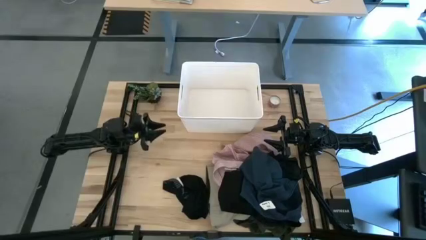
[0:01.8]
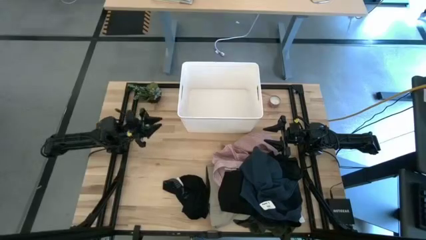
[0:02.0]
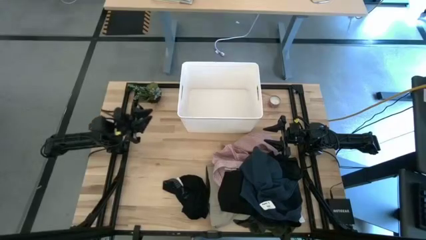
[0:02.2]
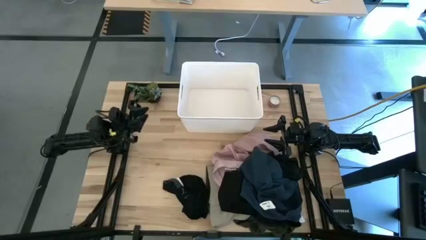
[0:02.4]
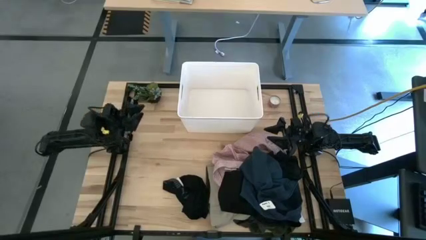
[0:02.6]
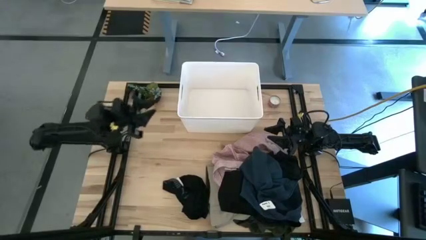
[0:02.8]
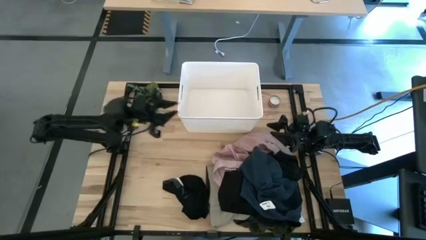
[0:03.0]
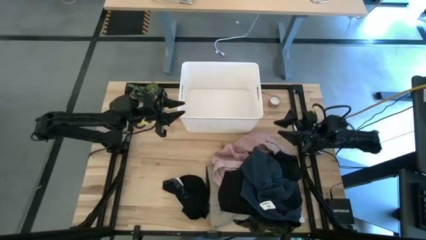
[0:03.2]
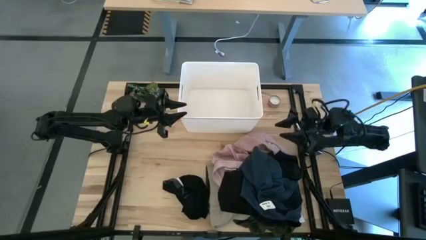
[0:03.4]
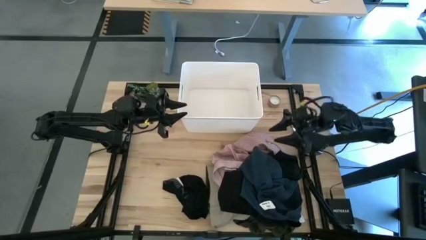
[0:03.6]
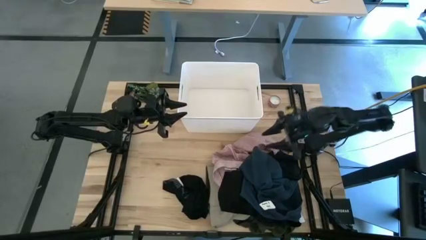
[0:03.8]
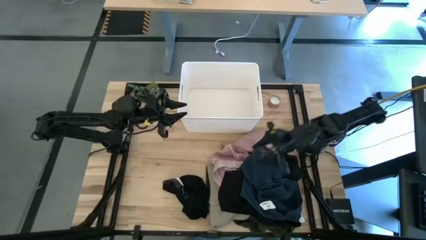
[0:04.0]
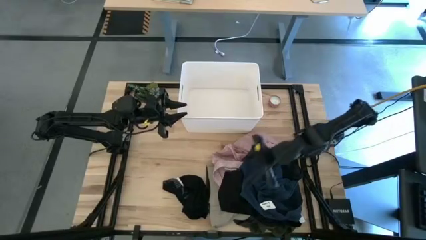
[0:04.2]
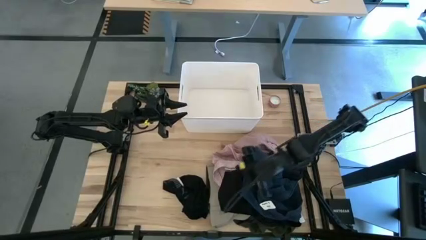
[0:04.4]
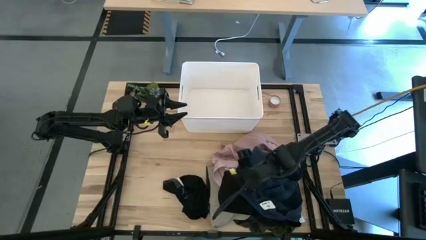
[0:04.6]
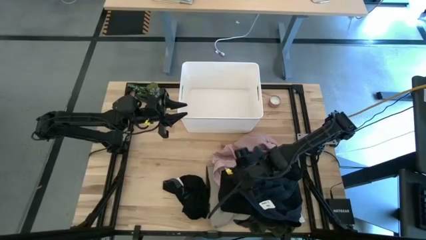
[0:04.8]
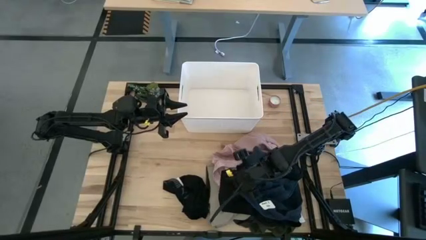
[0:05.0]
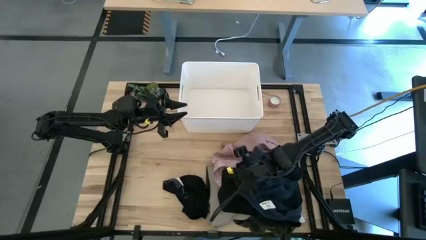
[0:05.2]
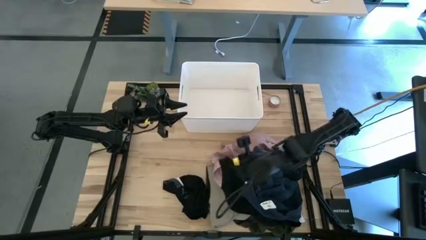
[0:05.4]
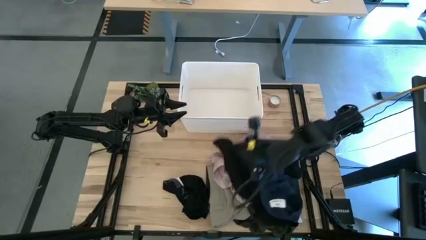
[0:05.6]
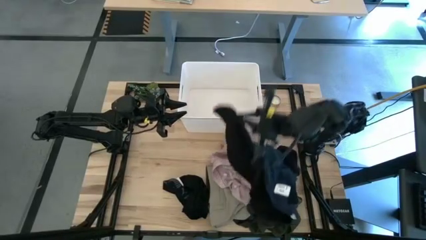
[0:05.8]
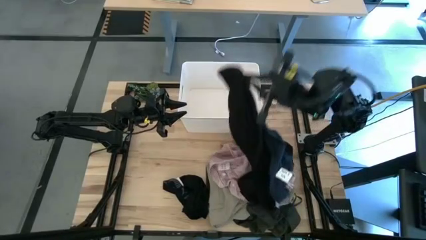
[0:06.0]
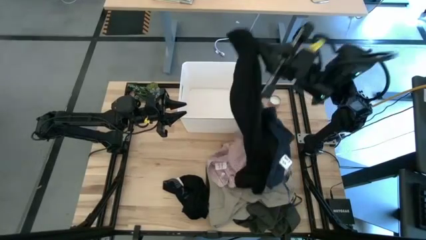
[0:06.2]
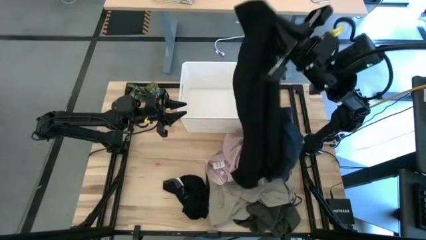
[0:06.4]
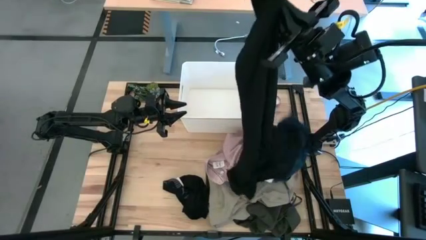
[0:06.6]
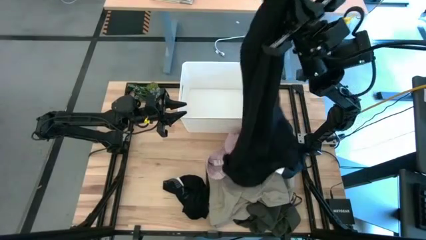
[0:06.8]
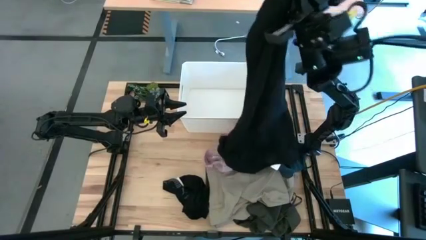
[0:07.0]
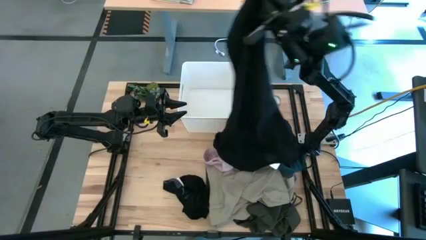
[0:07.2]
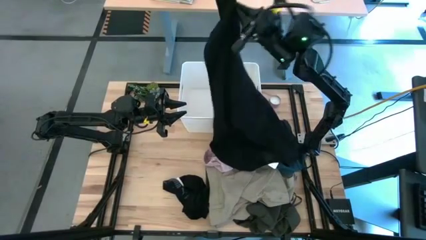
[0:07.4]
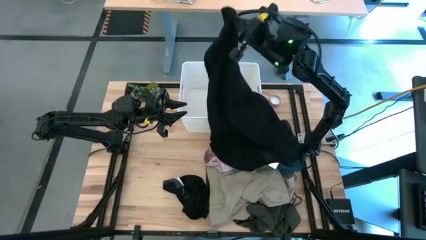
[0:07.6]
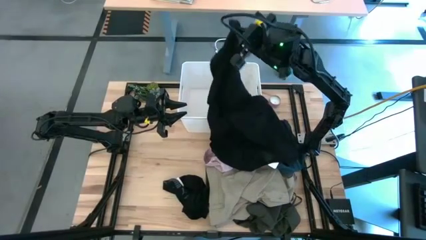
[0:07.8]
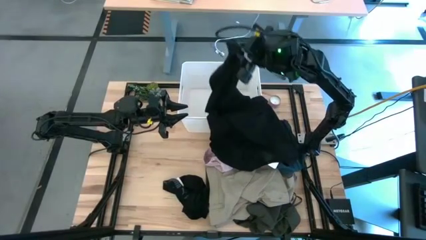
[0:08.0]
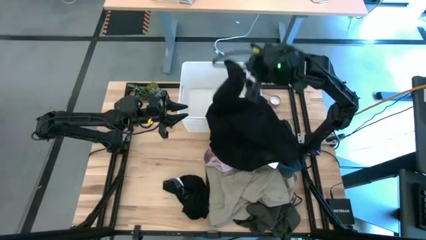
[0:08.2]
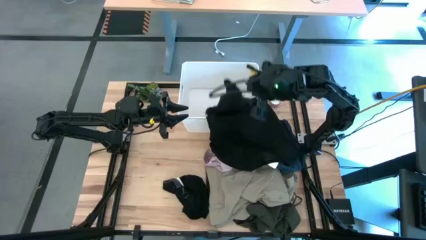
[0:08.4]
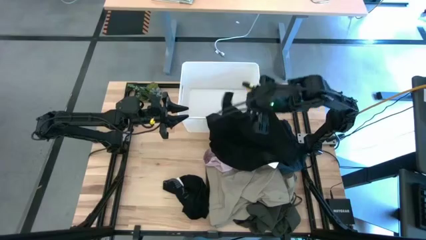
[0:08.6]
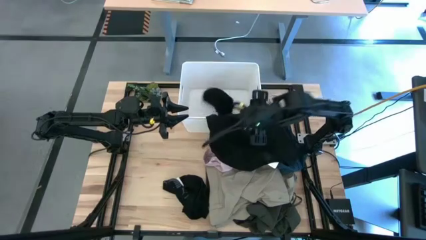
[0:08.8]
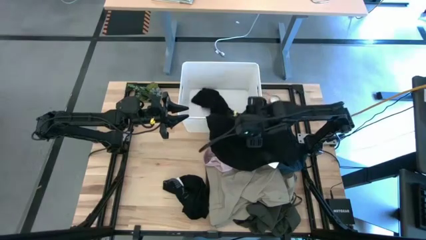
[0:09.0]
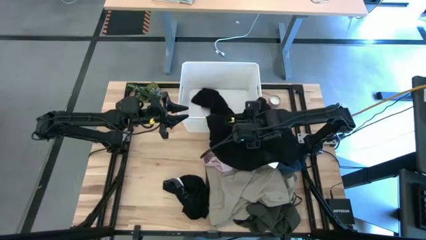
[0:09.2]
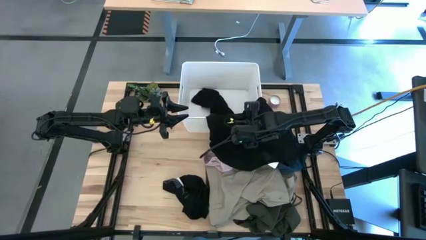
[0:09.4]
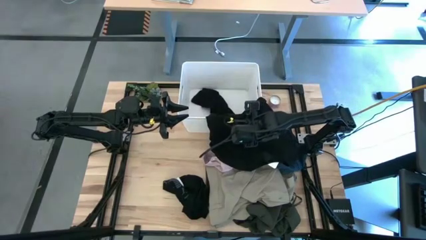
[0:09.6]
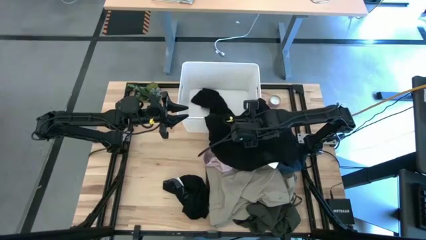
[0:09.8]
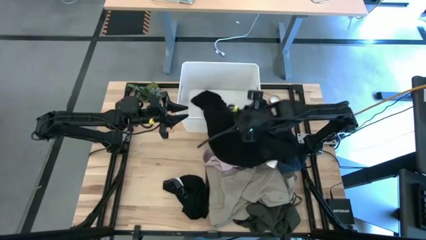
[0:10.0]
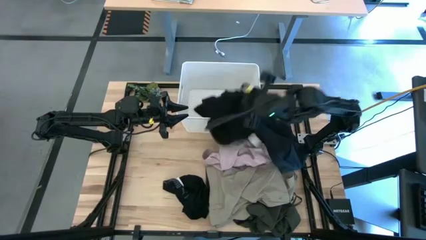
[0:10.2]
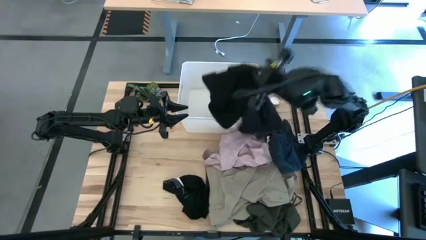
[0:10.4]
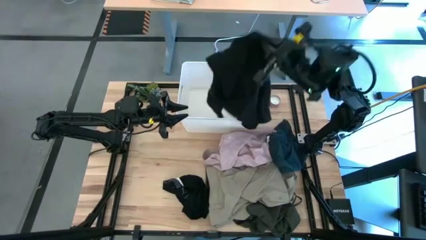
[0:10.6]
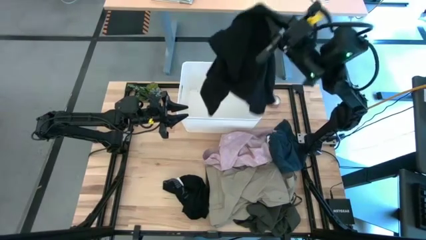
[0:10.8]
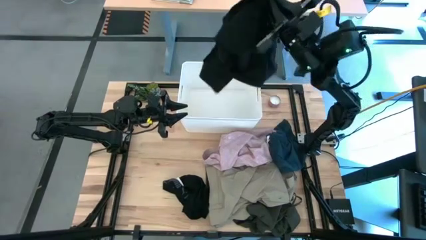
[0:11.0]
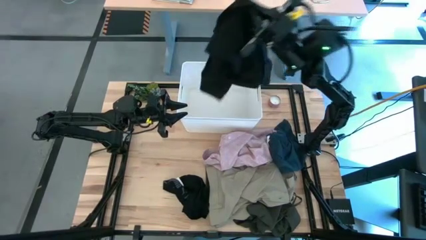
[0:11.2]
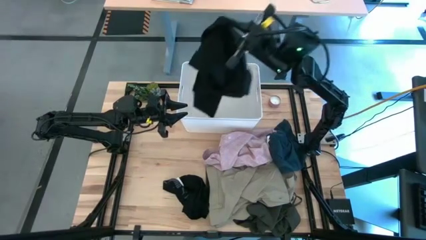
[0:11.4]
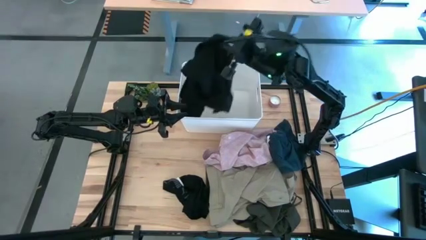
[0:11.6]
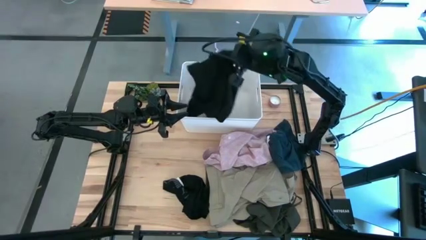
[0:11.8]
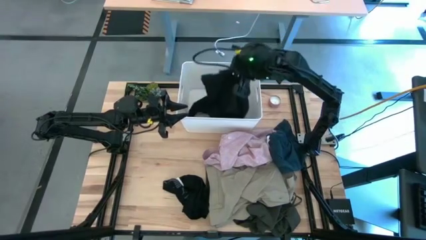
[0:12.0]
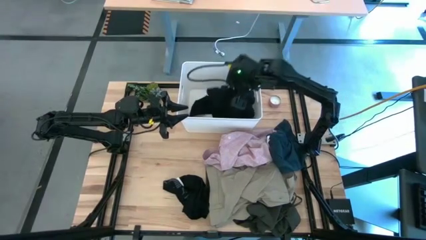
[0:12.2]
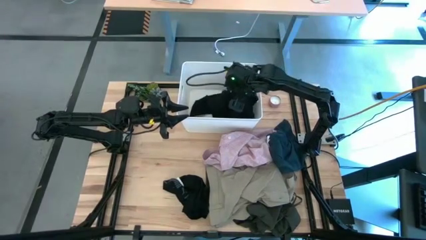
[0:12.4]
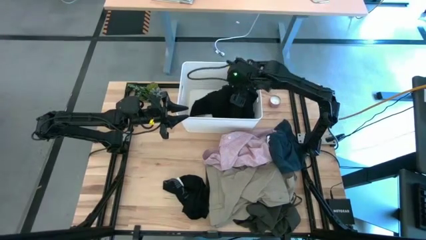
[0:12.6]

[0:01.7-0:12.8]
Task: Sort clothes
Put the black pants in the white bin

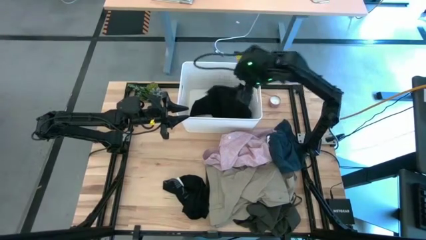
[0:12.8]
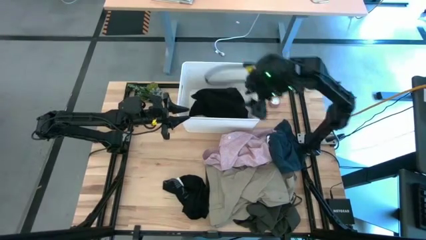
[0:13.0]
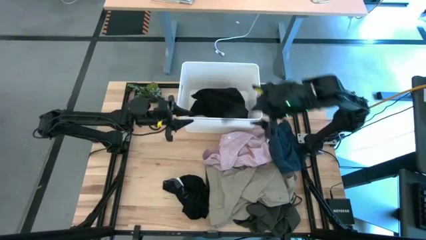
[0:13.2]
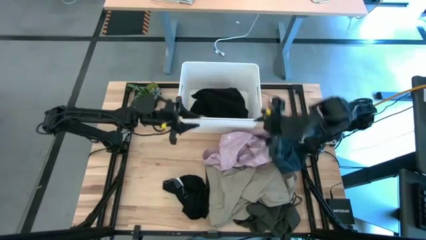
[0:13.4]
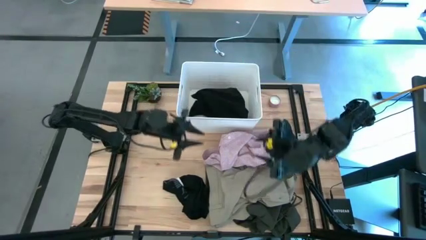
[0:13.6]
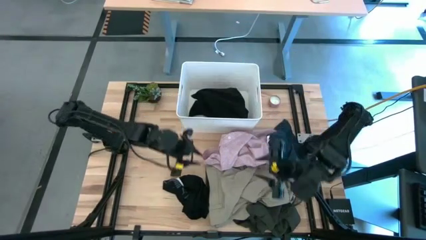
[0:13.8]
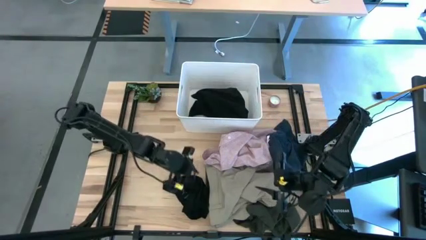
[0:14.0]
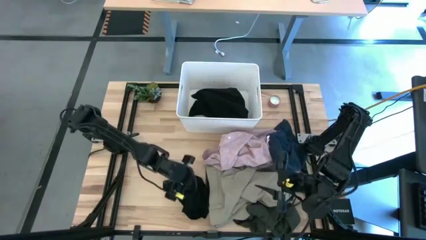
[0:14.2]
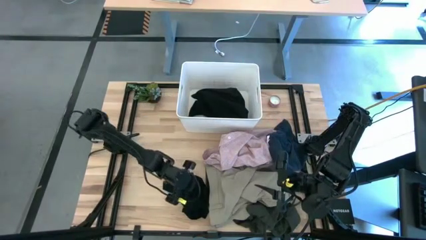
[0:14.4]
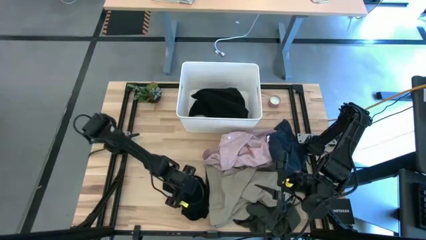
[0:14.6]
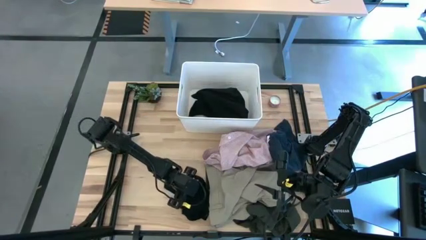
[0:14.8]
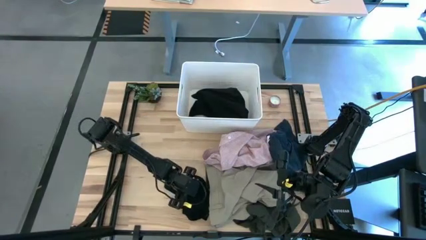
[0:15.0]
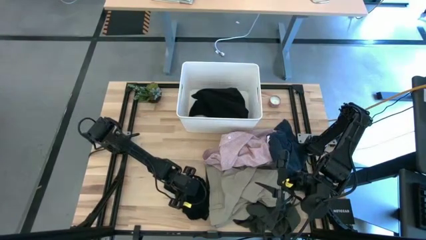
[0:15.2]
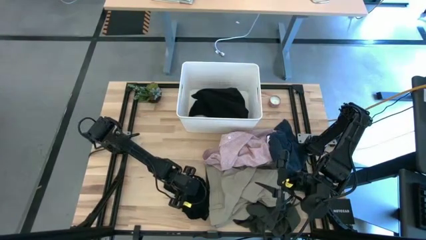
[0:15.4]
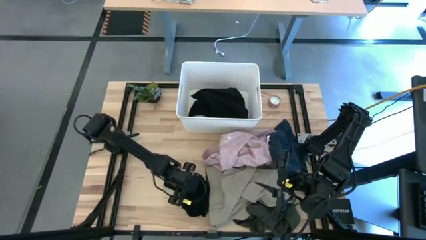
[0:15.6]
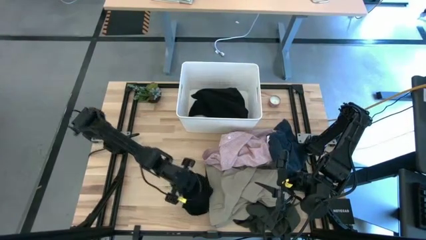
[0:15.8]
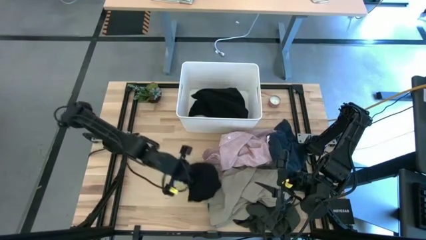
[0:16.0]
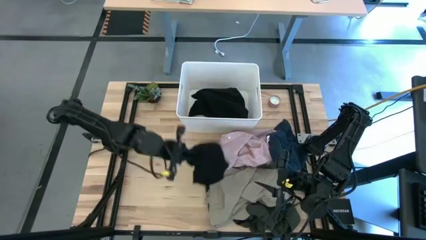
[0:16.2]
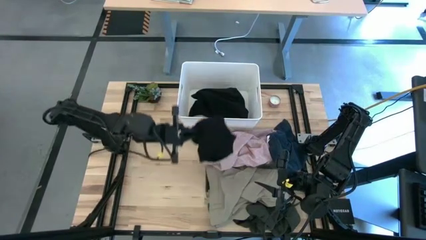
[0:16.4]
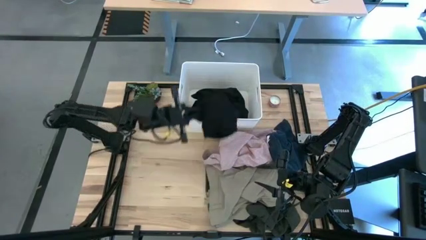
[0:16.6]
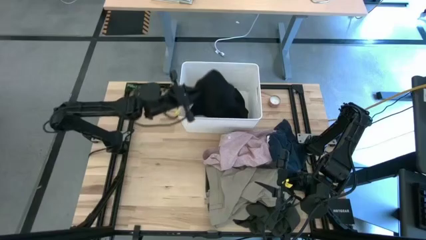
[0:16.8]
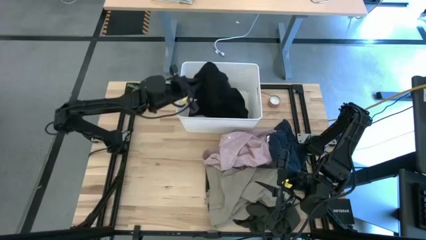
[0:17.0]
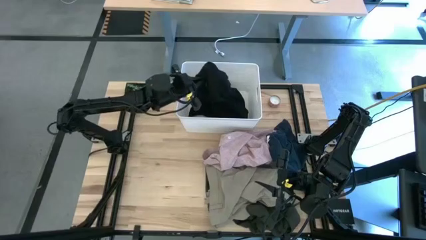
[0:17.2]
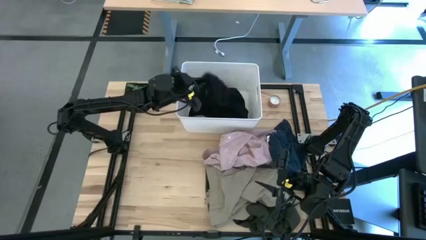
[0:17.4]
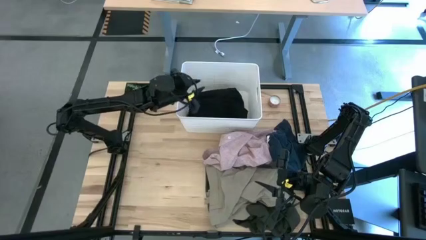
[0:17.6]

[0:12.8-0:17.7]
Put the black underwear in the white bin
